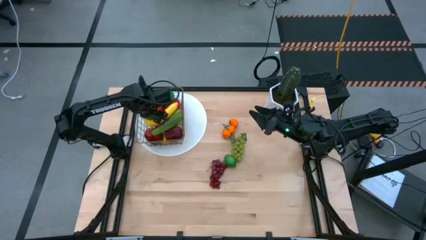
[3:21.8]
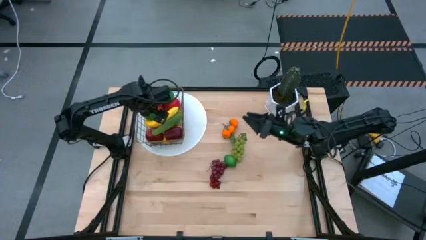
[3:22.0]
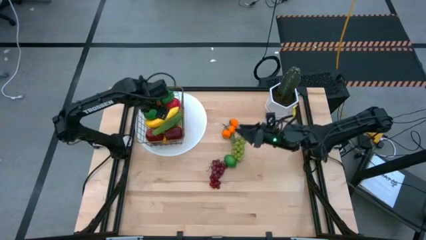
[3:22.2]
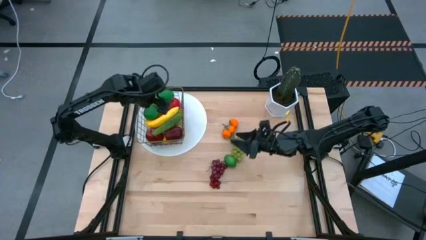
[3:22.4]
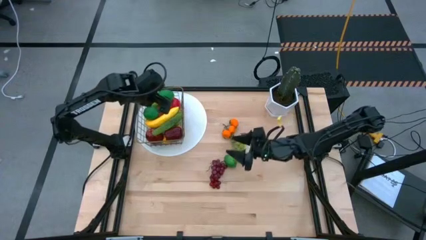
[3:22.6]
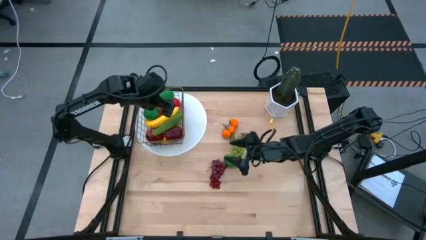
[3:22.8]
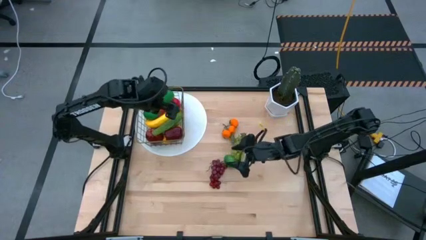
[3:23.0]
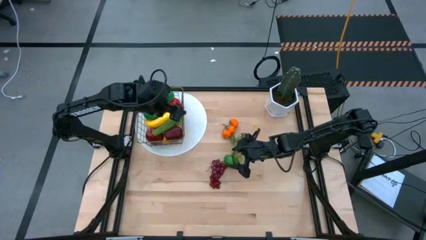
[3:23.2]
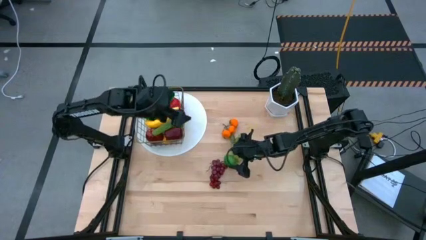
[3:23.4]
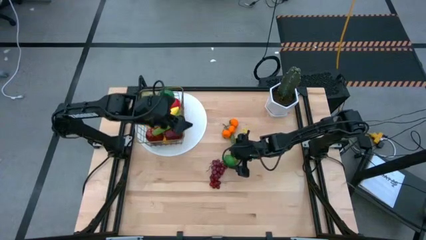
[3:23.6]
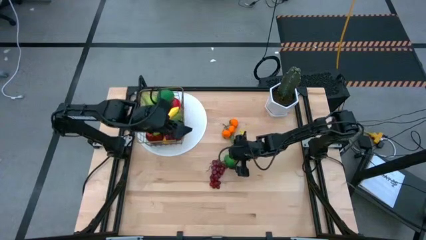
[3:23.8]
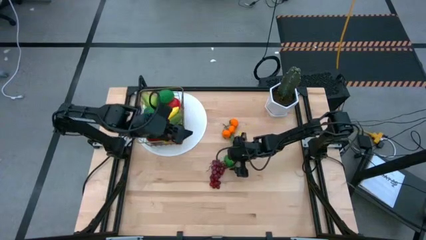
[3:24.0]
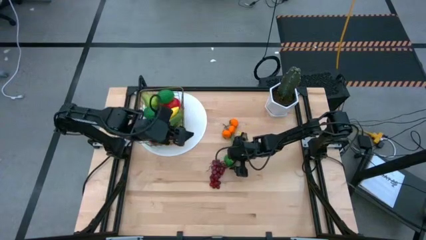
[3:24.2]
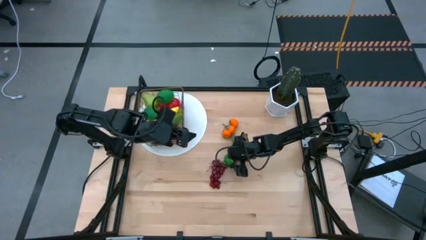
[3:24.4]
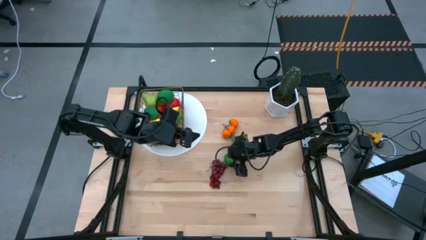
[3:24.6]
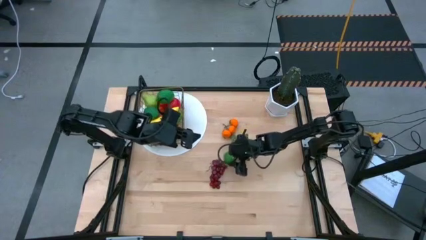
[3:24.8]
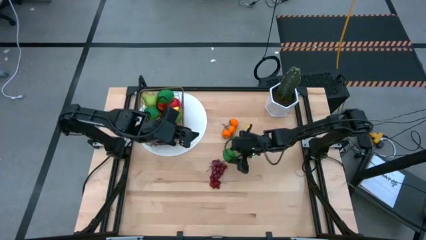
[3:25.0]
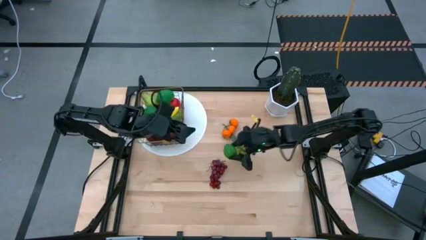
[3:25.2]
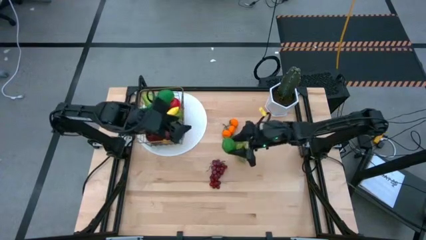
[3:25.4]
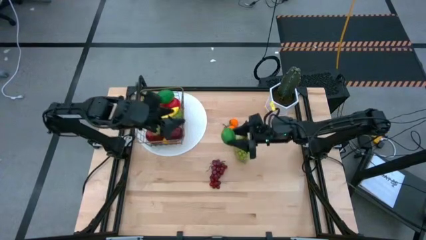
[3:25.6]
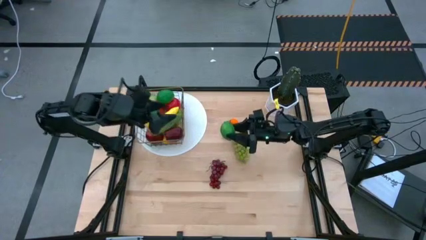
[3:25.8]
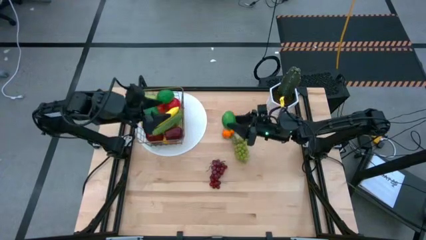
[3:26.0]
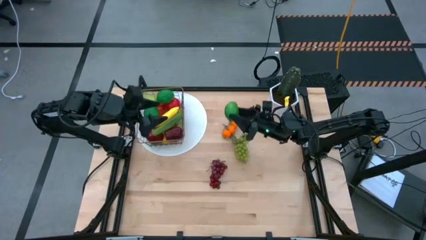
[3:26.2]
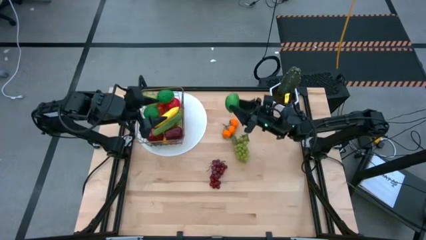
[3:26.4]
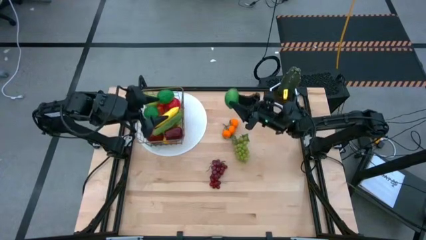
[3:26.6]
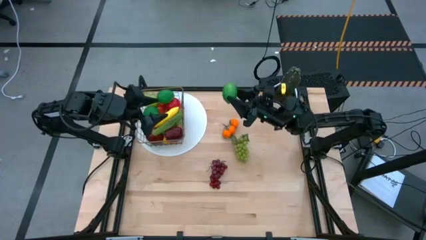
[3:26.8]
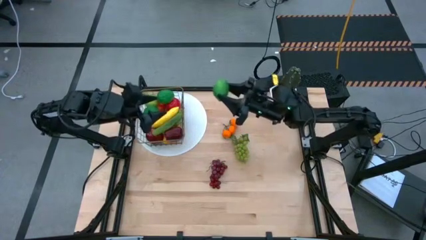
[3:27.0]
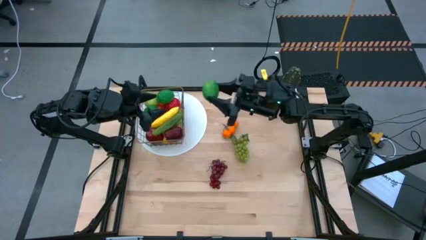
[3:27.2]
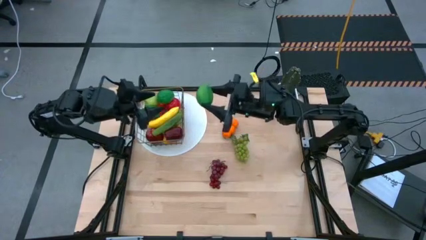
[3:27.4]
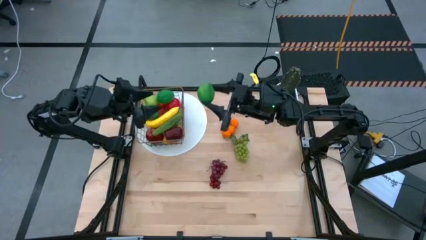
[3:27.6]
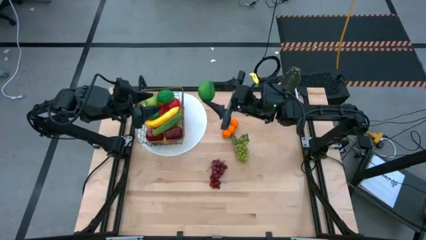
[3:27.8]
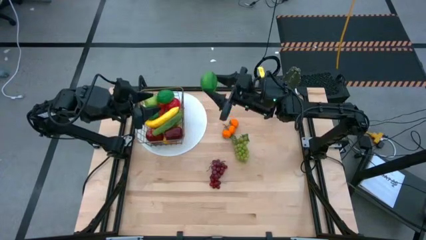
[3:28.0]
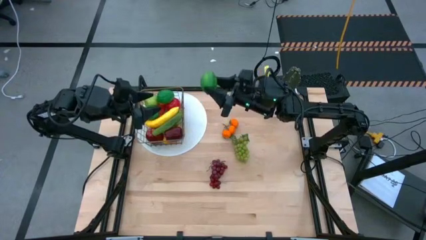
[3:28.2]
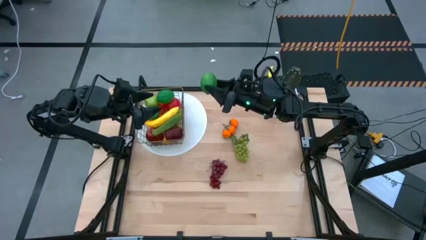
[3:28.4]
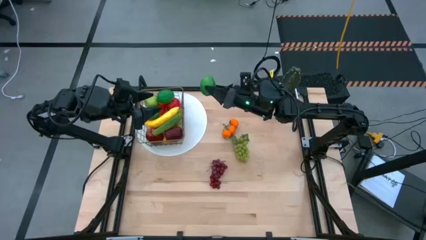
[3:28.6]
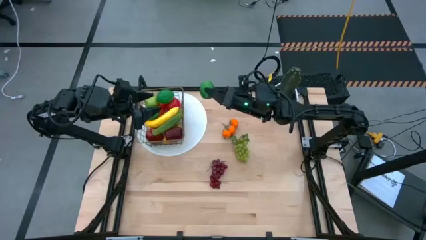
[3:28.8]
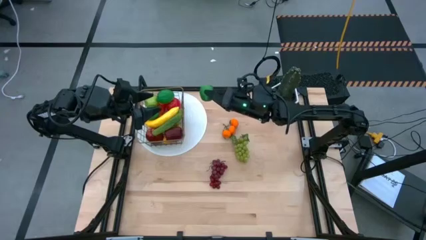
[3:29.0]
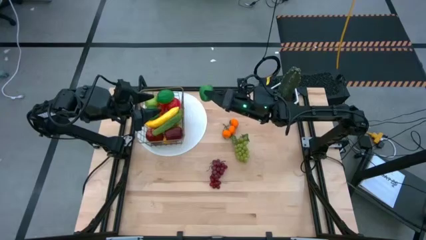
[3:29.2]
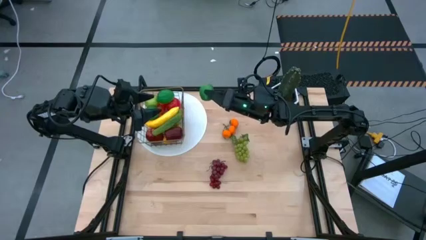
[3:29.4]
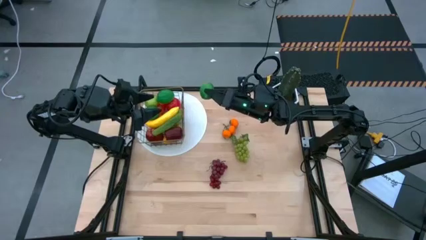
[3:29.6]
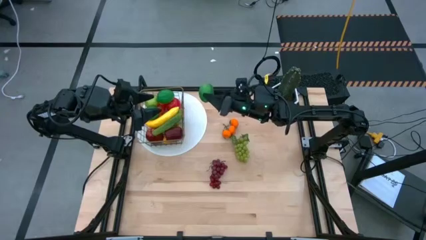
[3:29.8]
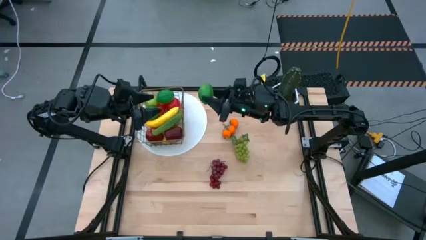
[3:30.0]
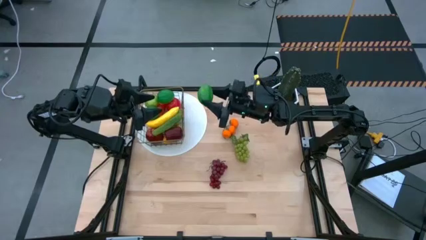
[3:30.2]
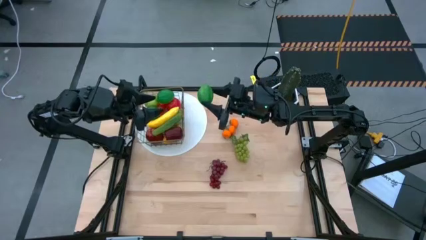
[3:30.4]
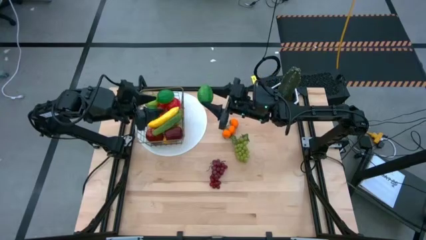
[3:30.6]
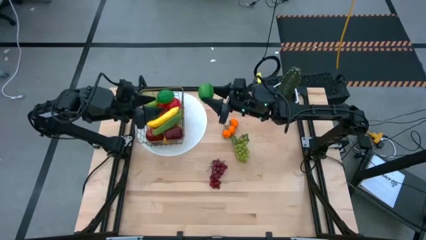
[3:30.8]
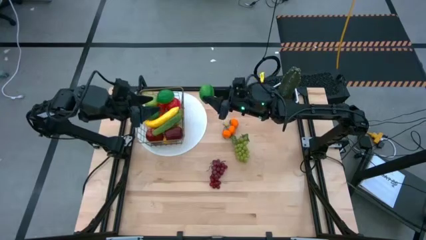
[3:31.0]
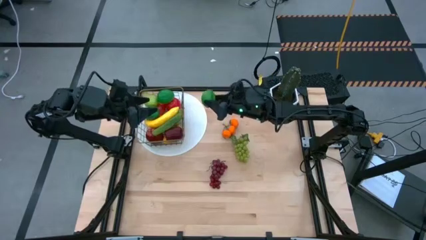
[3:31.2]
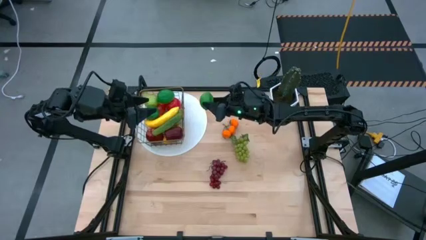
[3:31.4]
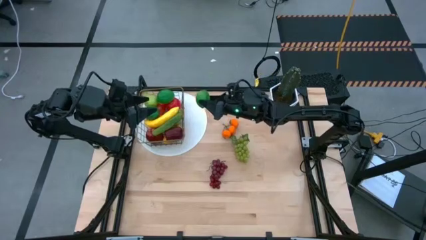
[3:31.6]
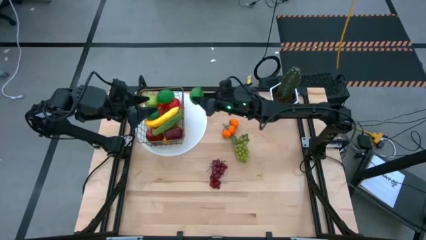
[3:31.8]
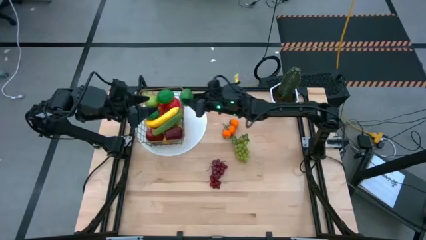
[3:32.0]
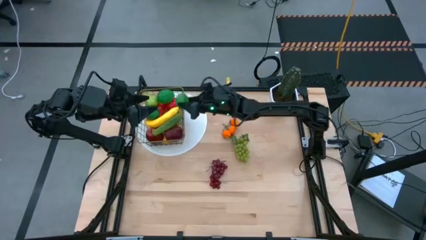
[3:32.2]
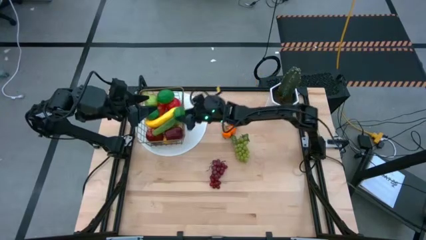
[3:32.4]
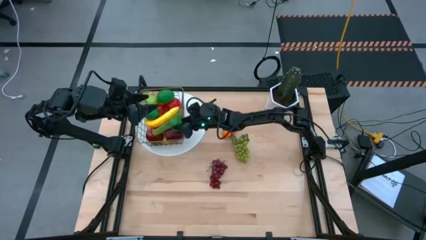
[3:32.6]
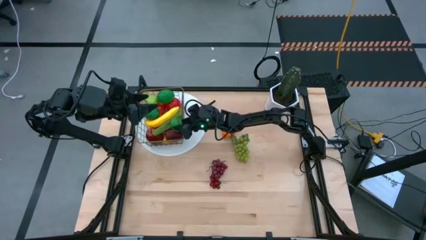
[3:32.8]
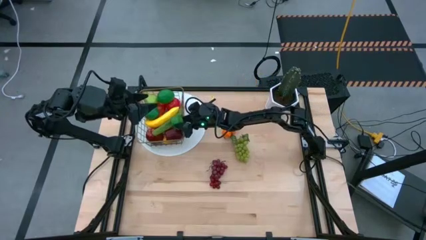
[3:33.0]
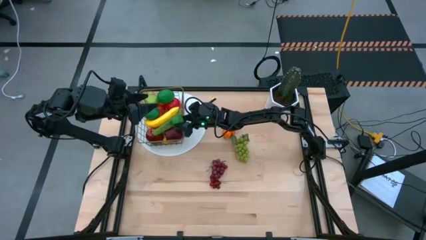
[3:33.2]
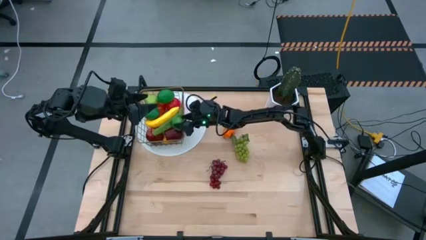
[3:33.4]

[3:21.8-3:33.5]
Task: Build produce basket
Put the green lime into the wire basket

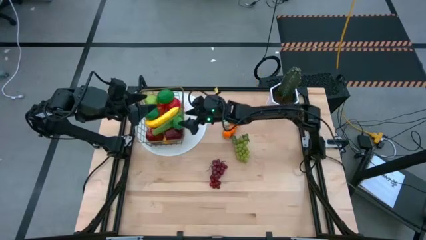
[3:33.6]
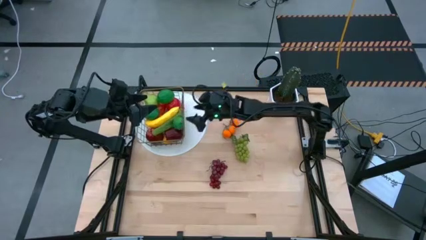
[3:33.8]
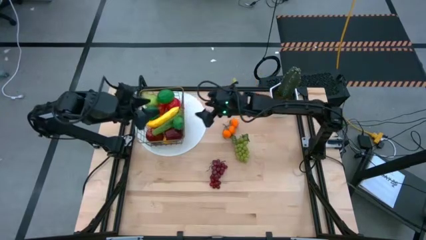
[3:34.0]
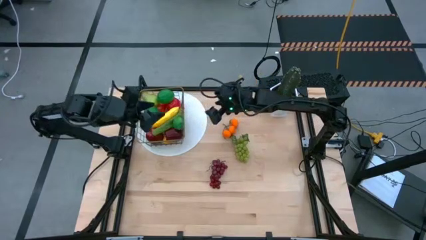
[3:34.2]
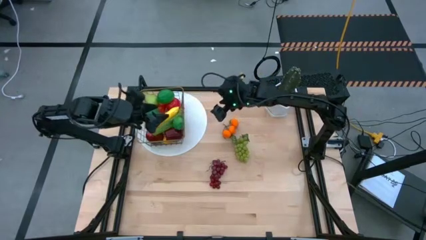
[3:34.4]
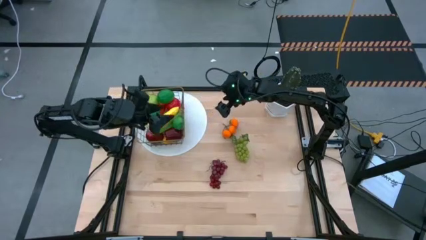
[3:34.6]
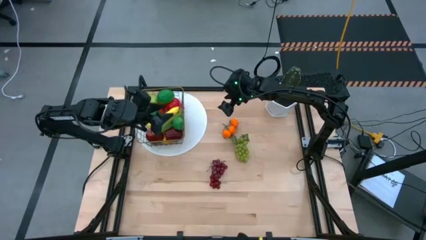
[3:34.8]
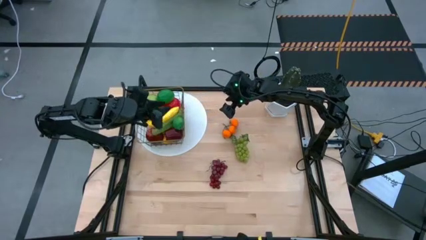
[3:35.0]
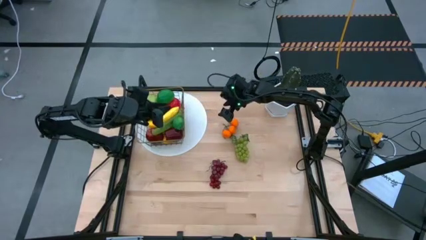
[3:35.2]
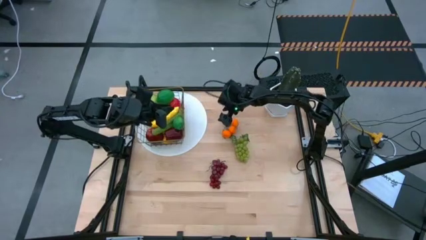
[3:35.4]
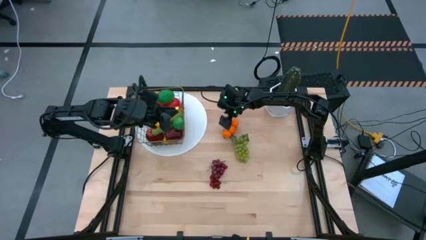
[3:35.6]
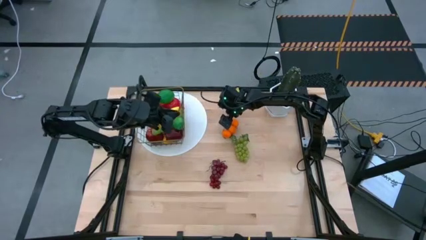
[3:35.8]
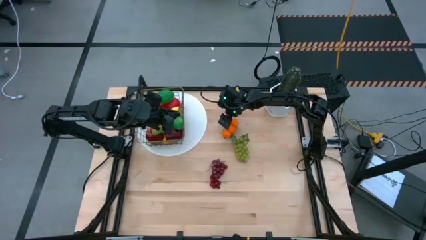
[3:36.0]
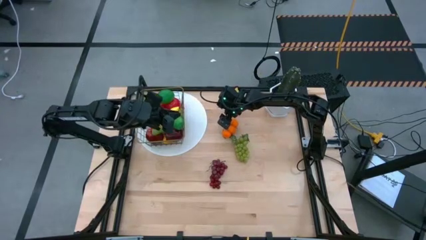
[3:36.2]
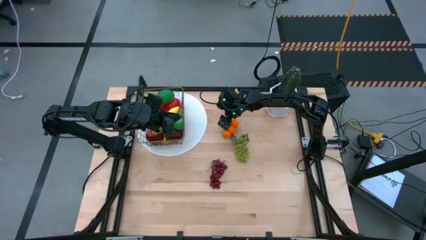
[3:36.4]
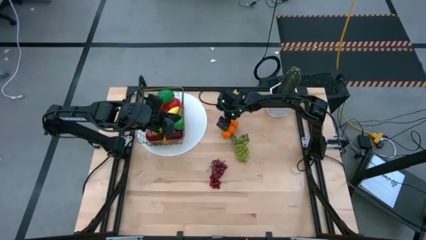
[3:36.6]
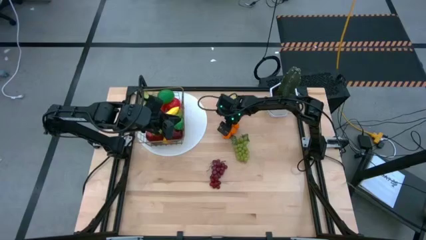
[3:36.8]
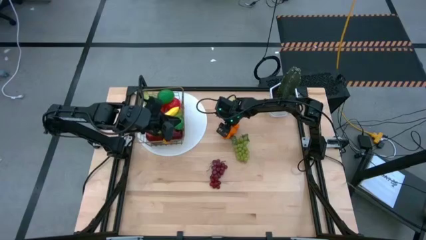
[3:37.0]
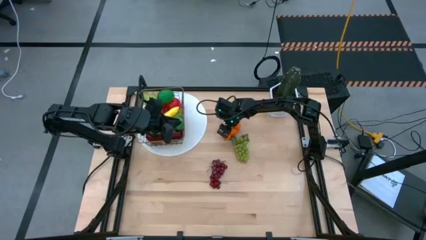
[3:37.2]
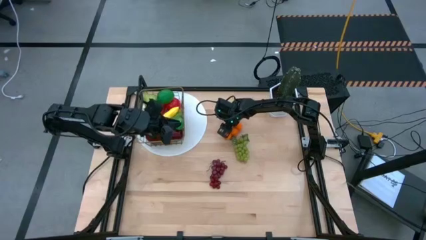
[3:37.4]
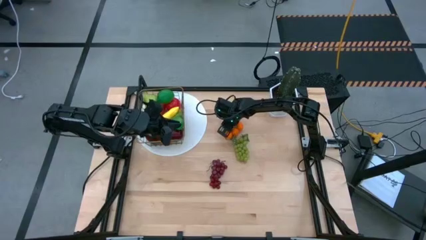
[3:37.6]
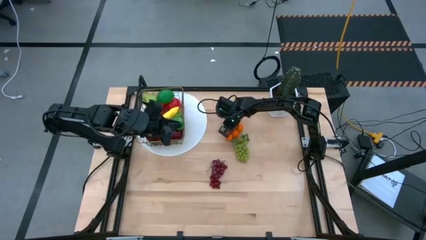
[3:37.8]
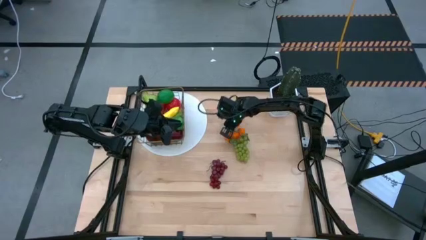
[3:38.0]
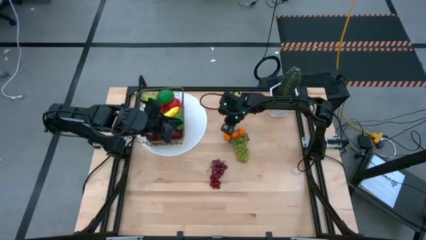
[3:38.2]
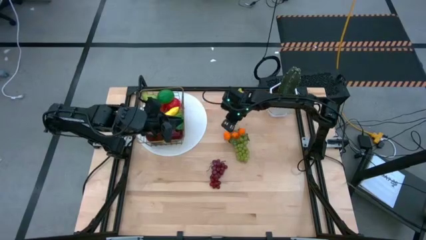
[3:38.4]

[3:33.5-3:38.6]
Put the orange tangerine into the wire basket
